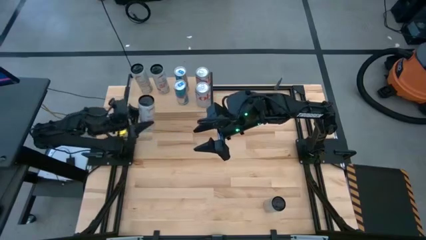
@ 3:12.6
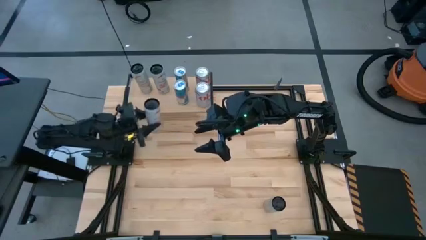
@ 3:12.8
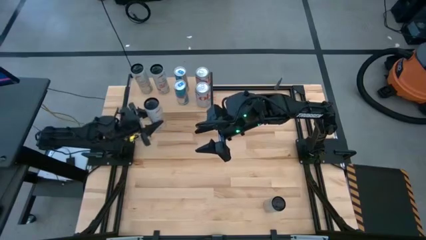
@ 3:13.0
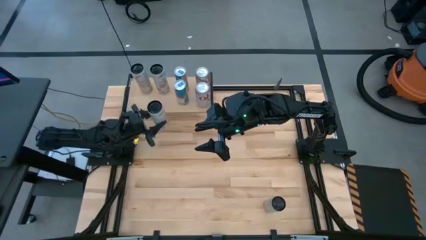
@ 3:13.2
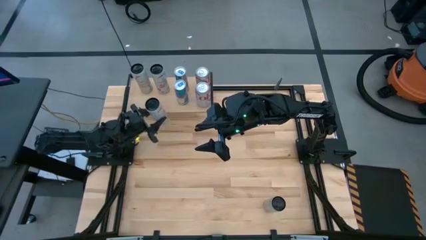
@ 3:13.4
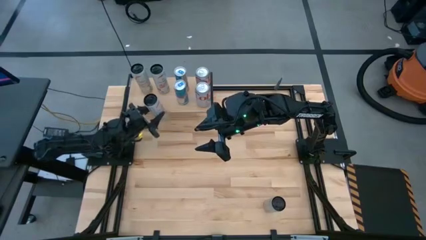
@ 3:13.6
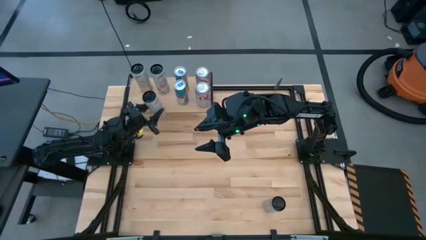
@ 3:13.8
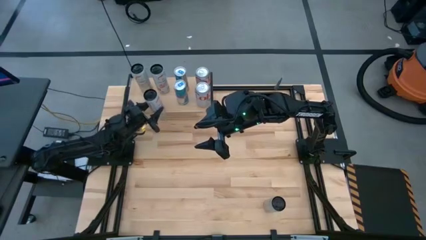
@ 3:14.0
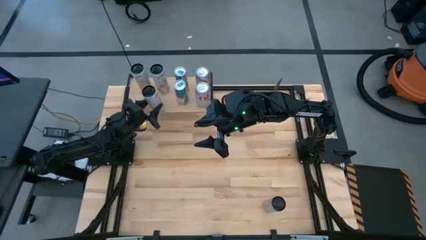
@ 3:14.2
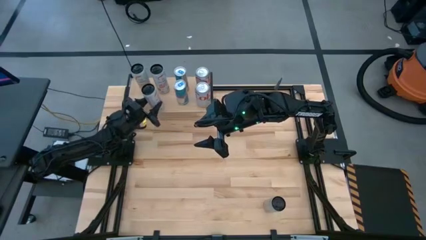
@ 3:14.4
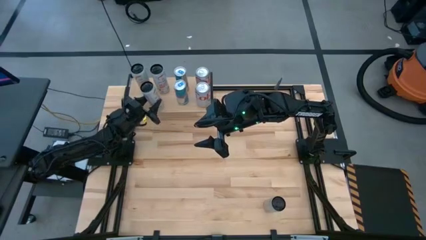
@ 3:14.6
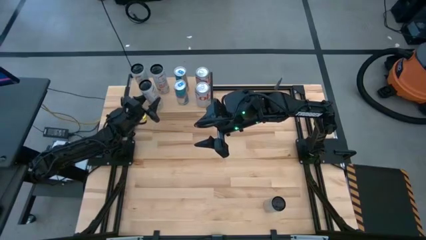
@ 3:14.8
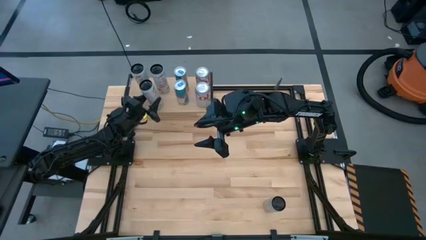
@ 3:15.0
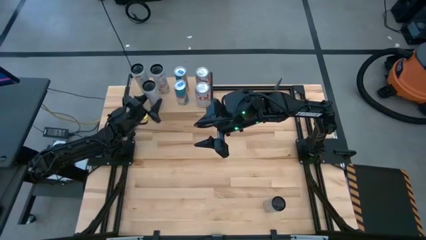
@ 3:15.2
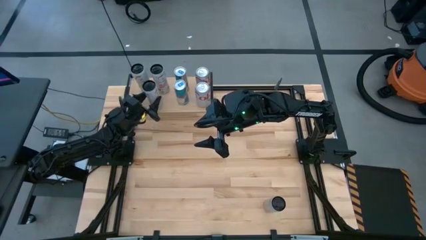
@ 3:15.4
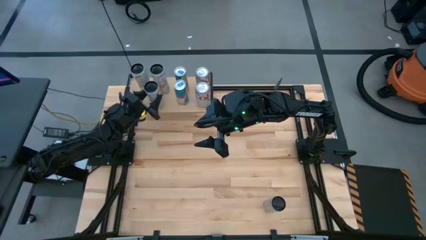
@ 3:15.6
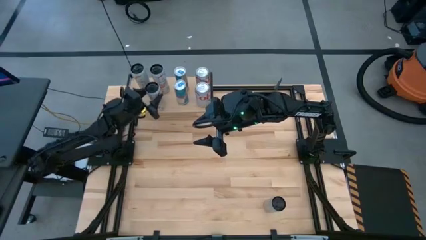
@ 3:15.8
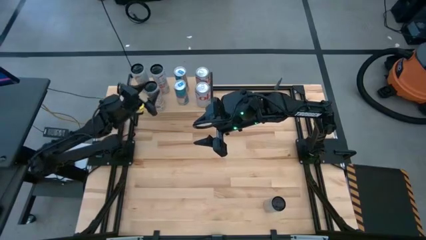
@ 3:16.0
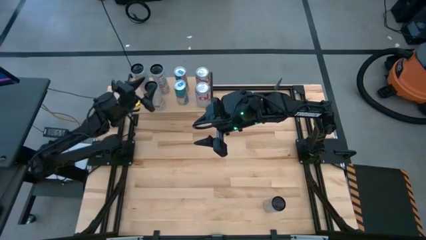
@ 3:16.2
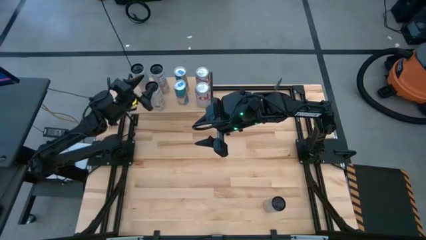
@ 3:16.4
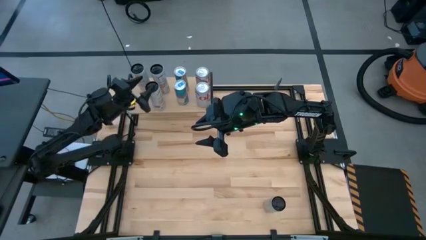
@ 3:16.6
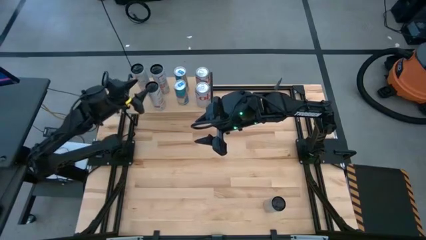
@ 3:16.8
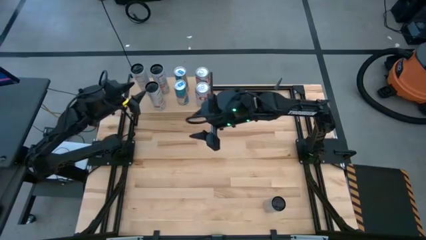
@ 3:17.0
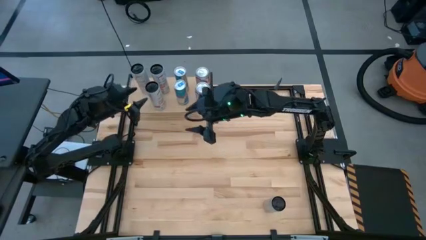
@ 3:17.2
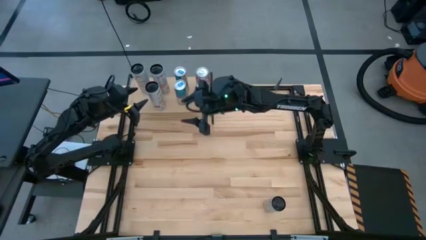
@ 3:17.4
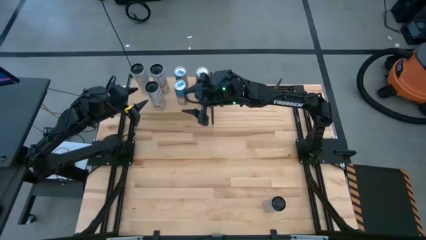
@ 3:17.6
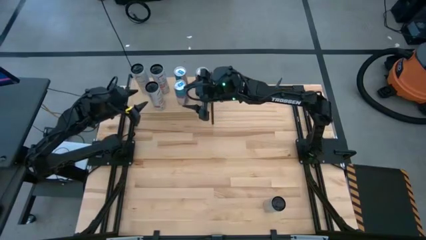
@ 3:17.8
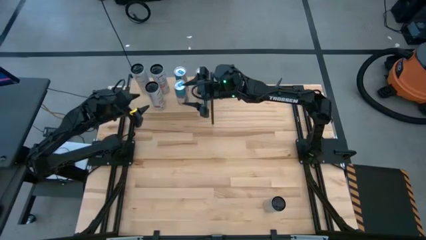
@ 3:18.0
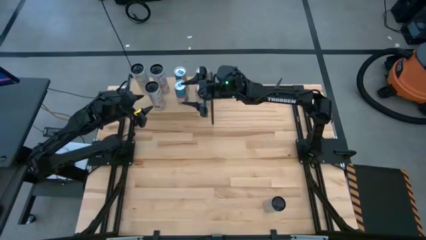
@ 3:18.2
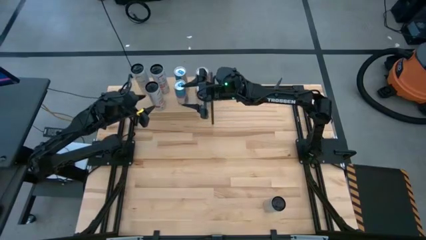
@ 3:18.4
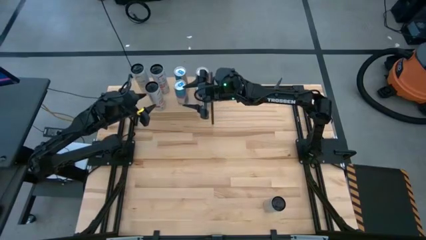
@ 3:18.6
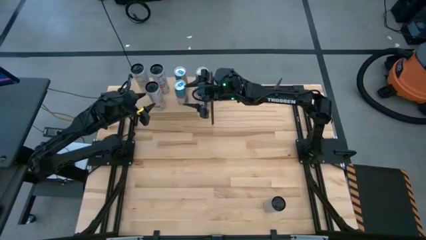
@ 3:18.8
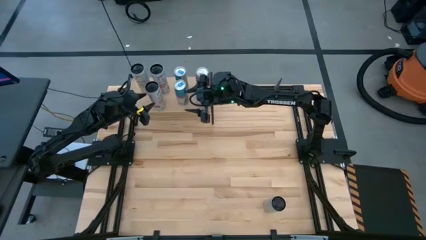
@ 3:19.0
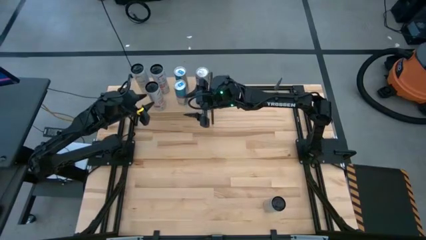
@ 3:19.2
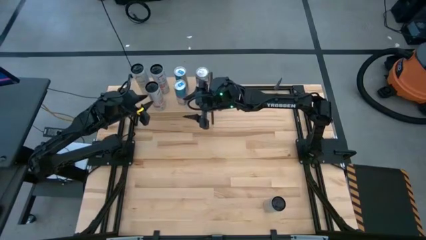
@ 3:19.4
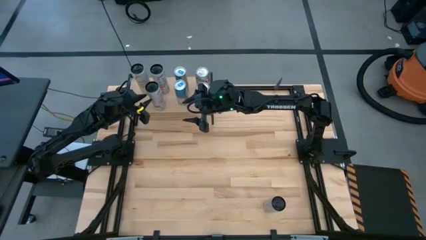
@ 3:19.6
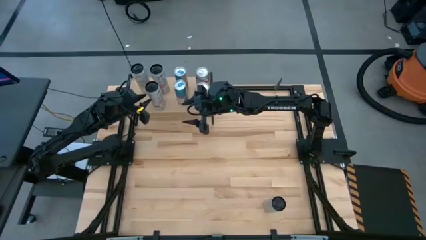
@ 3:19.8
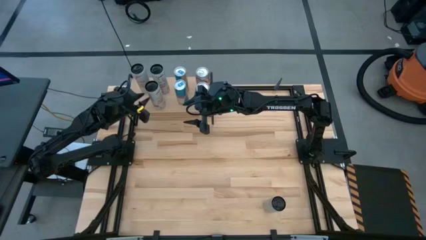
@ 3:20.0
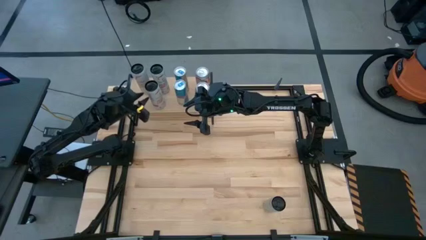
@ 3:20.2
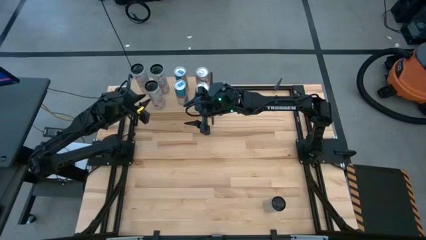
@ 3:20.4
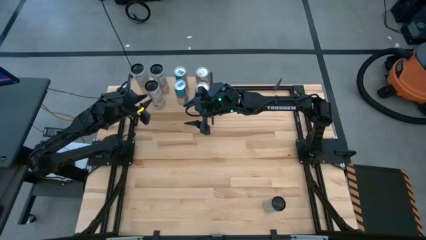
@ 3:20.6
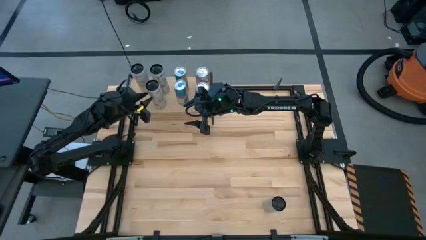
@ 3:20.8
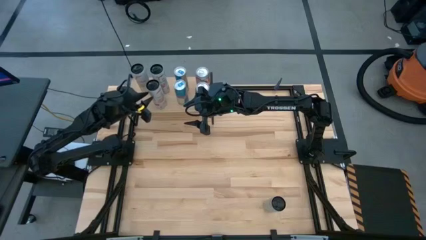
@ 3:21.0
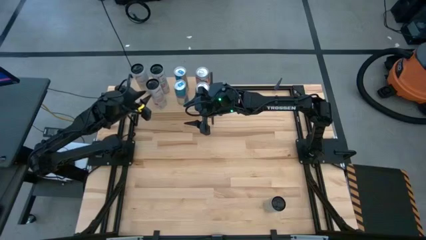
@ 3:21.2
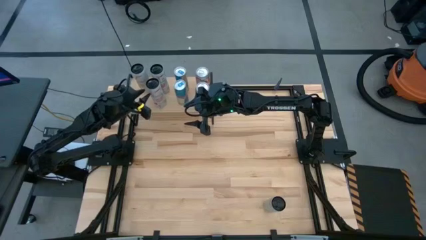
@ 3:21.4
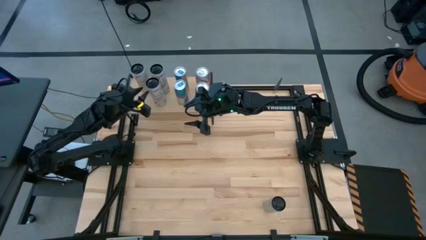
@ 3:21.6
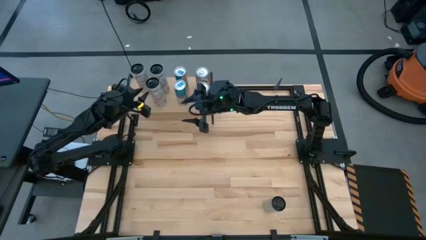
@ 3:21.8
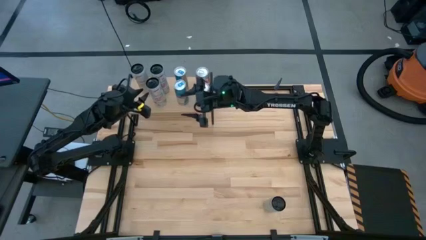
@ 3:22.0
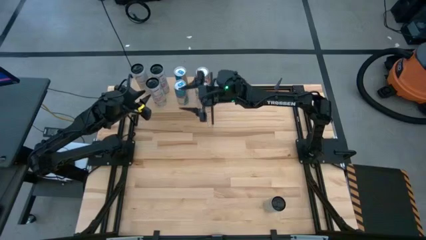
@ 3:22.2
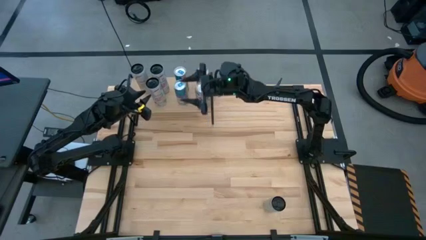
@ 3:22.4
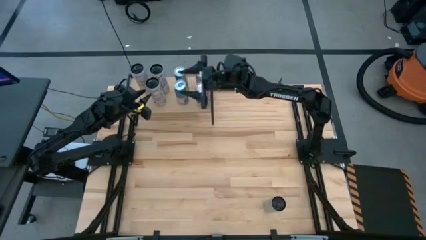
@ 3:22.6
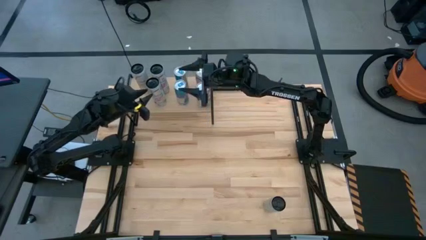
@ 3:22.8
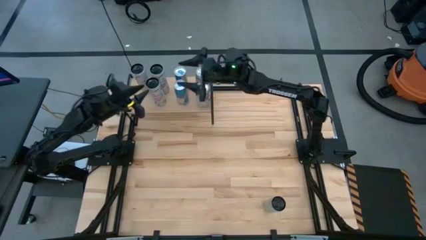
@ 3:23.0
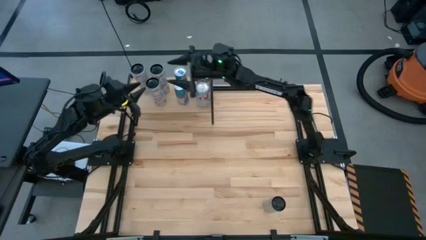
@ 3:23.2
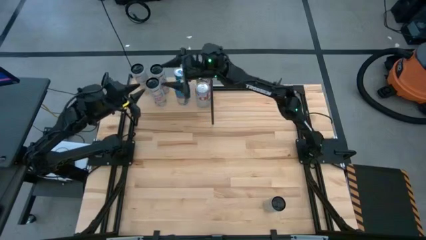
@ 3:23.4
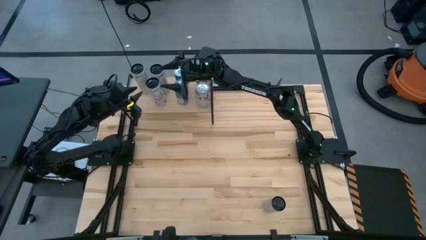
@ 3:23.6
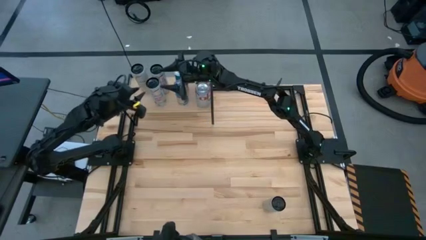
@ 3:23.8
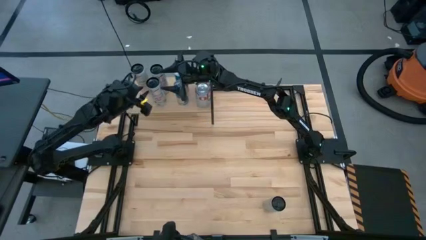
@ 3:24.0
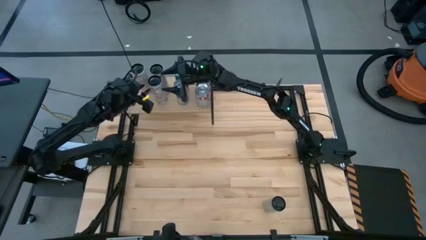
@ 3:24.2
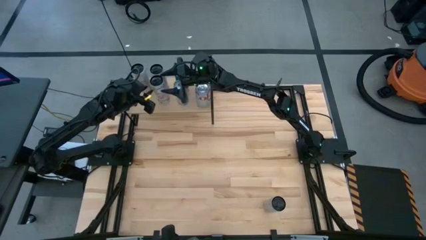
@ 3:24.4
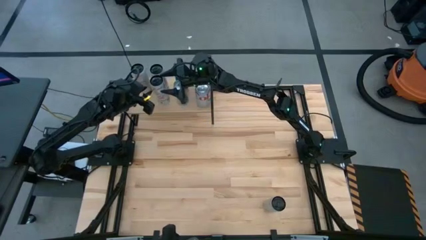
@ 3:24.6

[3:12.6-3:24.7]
Task: Place canned beverage on shelf
Put the white-pink soda can on the shelf aligned with the other white-pink soda can

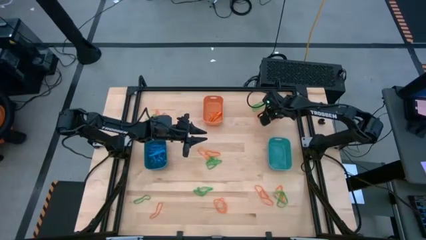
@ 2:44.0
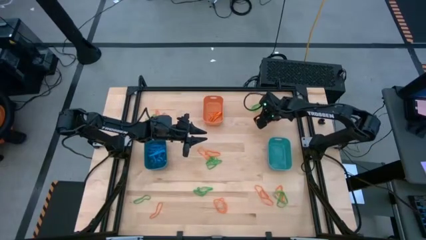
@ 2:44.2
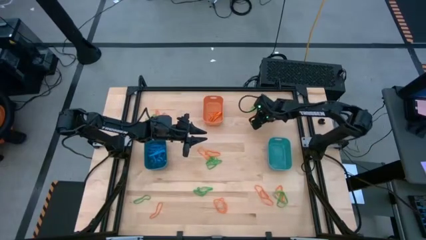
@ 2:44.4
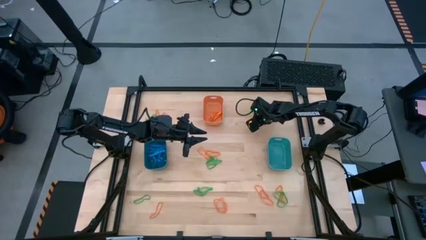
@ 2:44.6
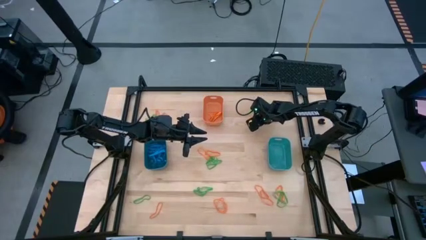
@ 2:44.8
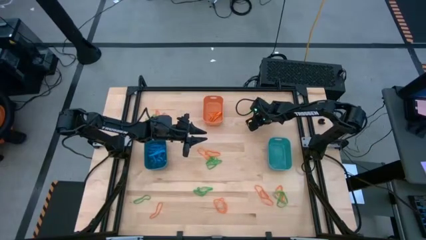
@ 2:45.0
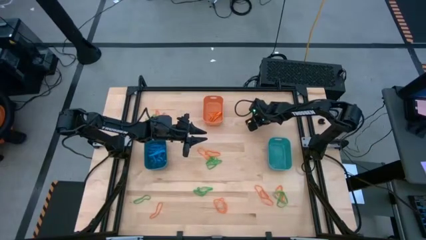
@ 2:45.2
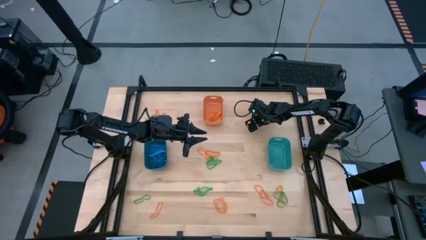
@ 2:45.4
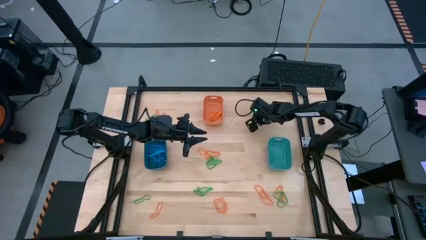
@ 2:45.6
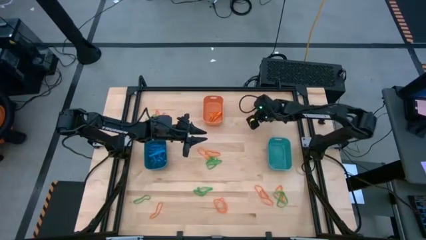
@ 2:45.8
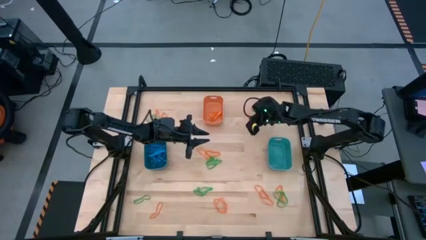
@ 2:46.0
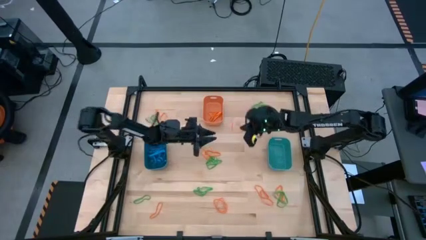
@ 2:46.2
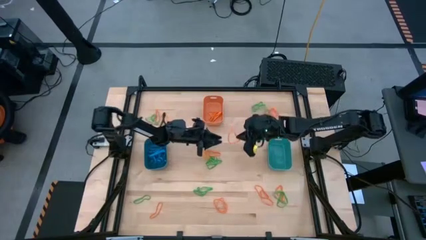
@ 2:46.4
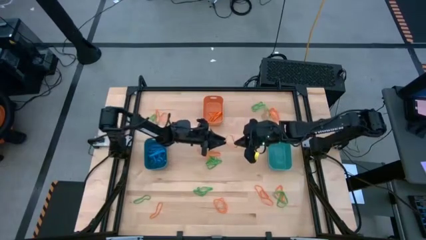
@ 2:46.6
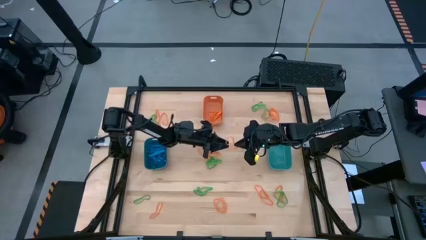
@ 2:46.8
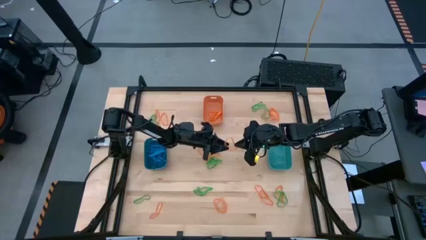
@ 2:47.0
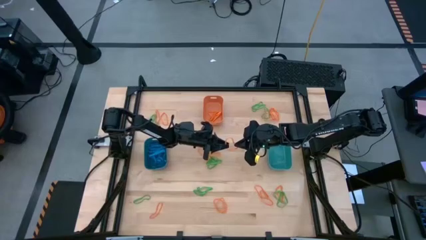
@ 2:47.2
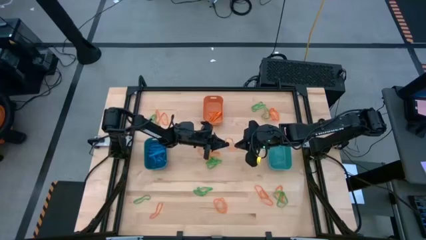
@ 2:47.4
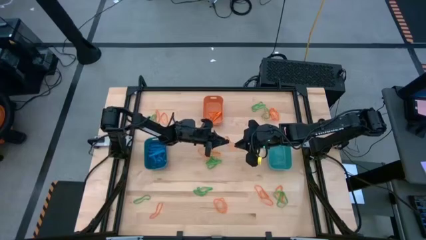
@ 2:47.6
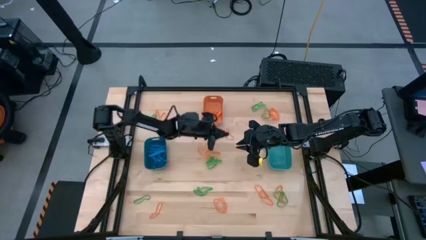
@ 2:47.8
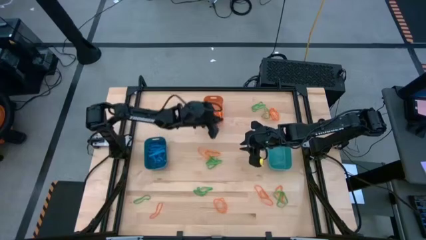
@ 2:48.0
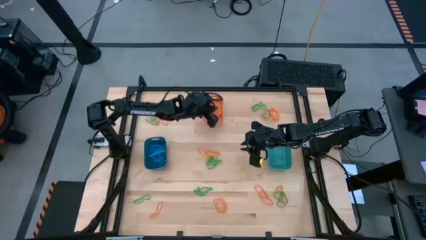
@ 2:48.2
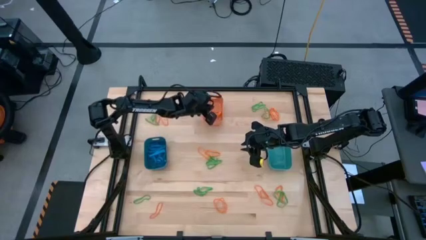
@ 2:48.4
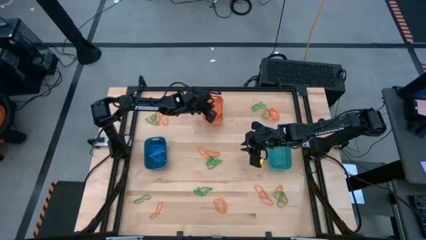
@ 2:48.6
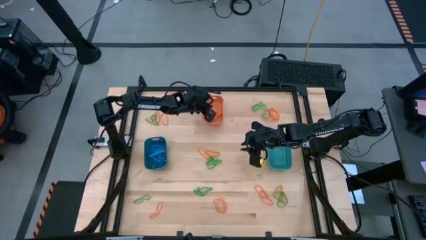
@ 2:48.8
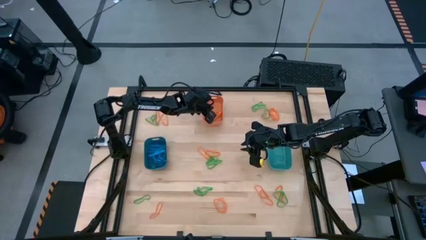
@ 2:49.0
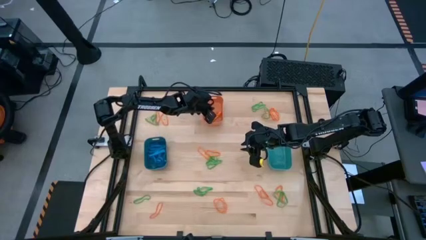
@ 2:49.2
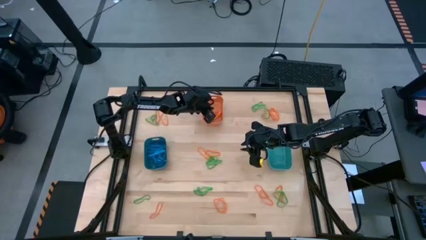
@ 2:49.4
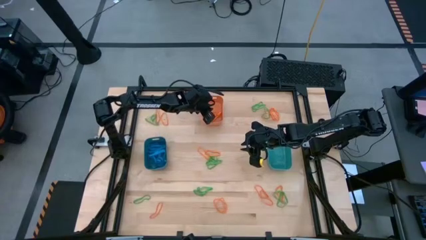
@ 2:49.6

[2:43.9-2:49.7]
Task: Sort rubber bands into baskets
Put the orange rubber band into the orange bin
